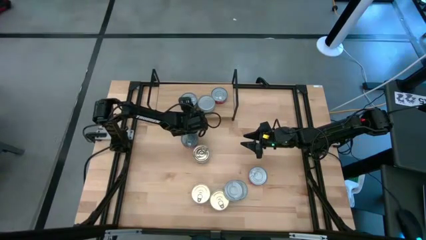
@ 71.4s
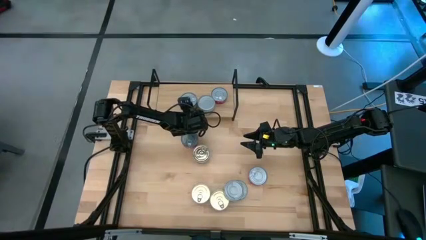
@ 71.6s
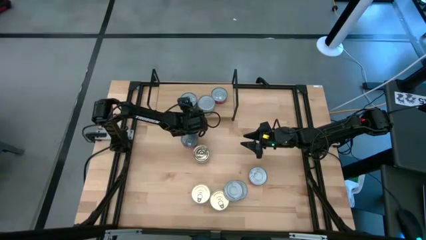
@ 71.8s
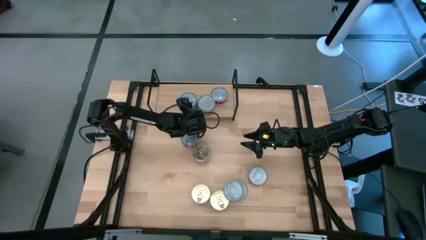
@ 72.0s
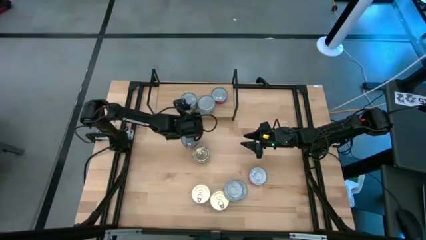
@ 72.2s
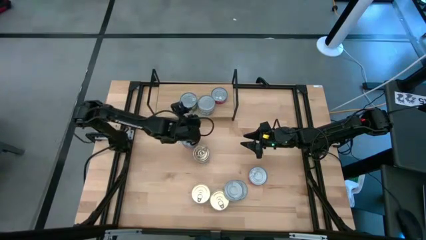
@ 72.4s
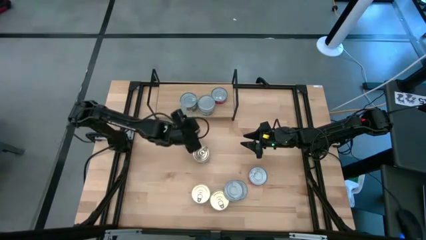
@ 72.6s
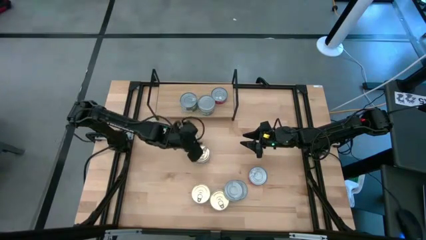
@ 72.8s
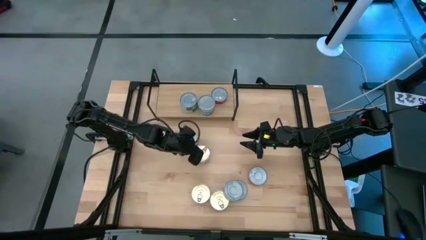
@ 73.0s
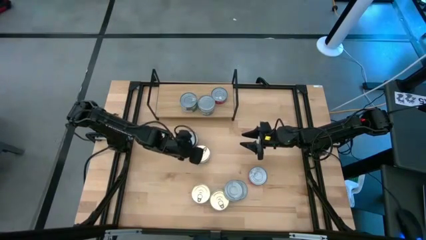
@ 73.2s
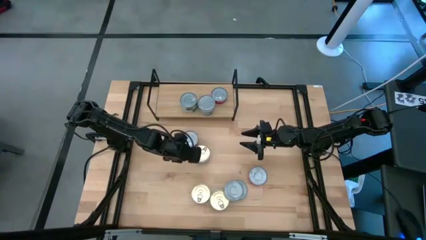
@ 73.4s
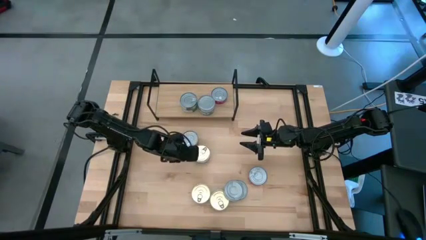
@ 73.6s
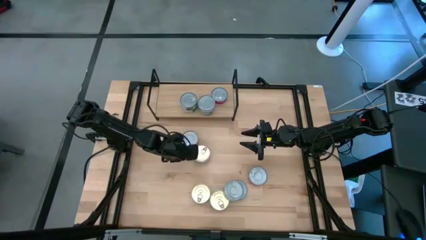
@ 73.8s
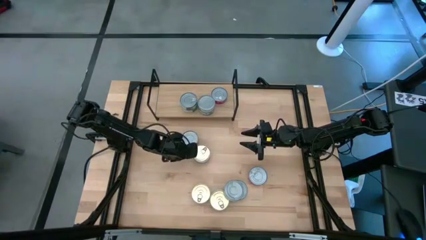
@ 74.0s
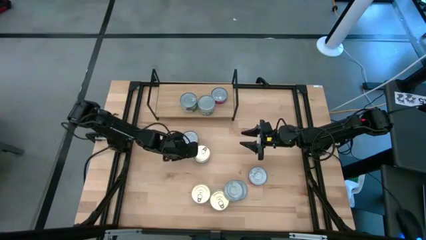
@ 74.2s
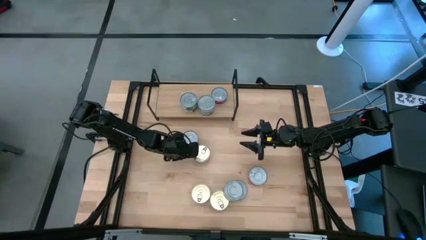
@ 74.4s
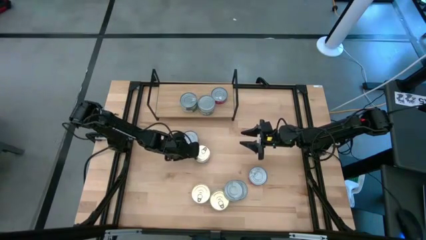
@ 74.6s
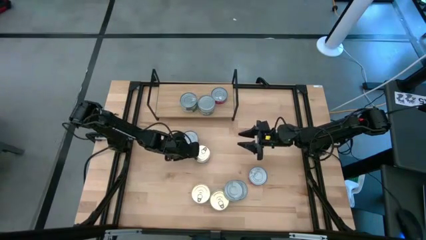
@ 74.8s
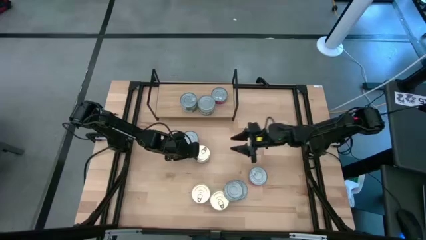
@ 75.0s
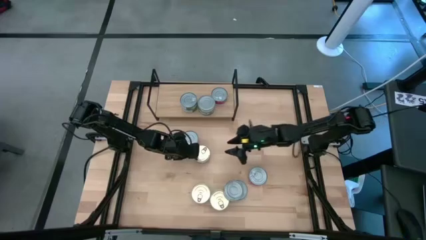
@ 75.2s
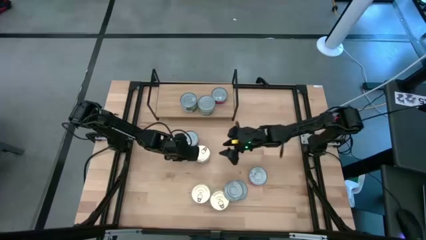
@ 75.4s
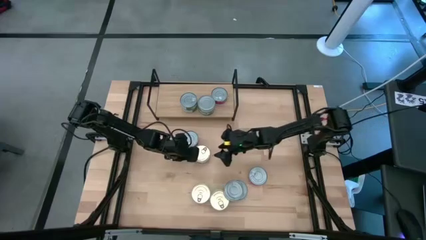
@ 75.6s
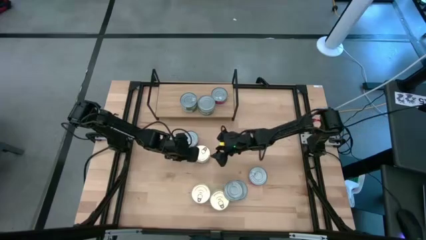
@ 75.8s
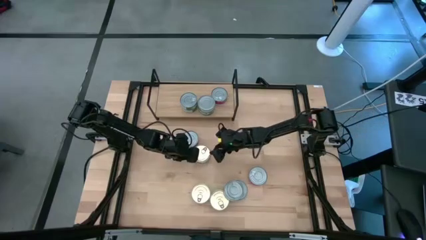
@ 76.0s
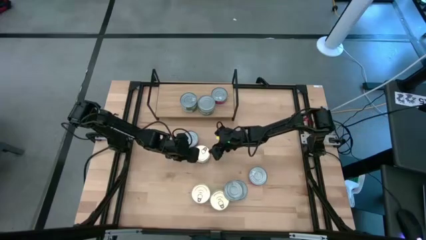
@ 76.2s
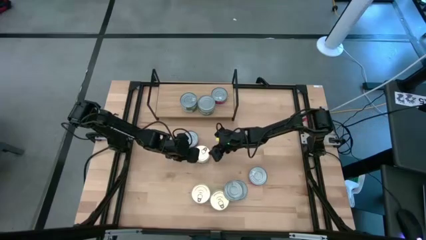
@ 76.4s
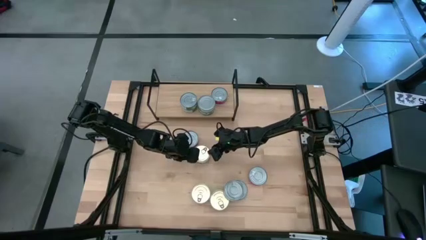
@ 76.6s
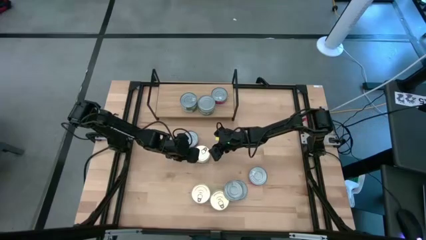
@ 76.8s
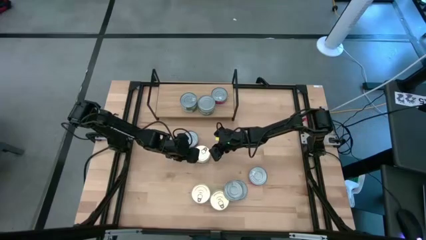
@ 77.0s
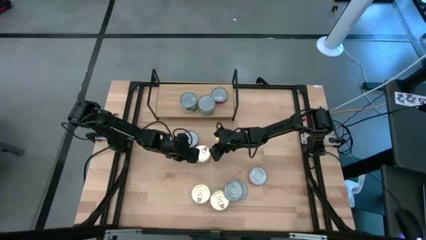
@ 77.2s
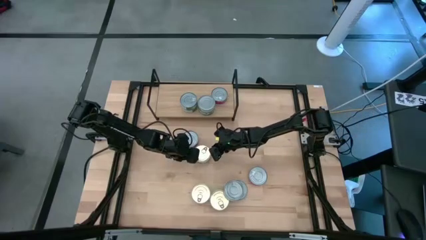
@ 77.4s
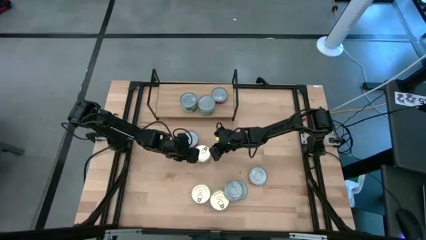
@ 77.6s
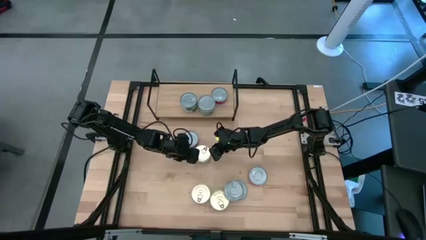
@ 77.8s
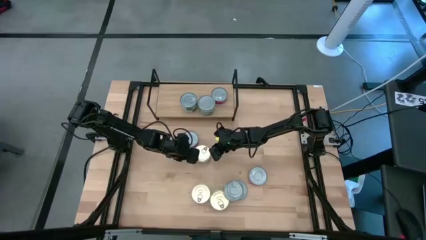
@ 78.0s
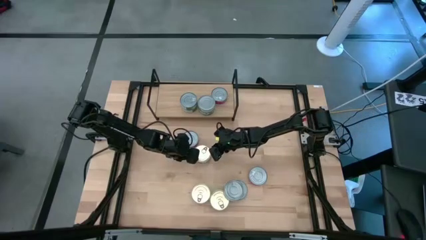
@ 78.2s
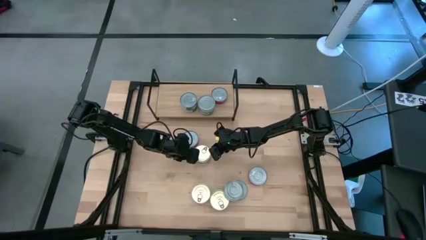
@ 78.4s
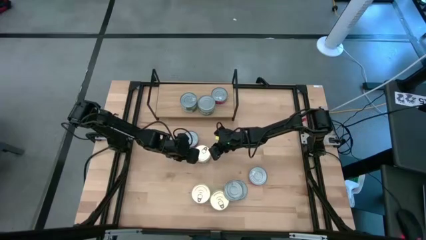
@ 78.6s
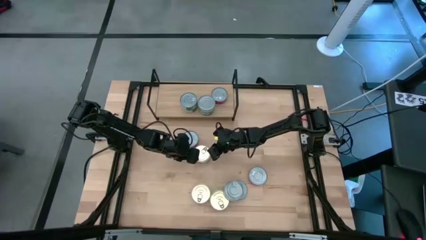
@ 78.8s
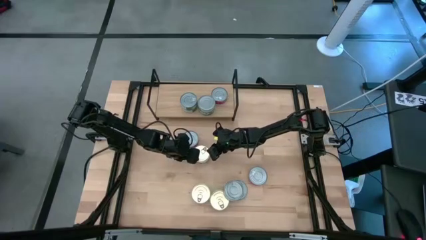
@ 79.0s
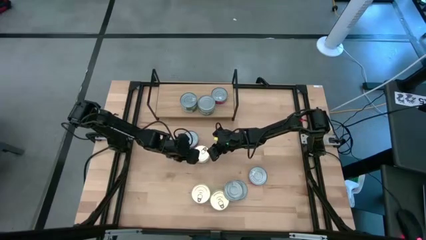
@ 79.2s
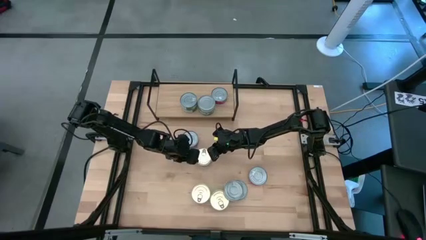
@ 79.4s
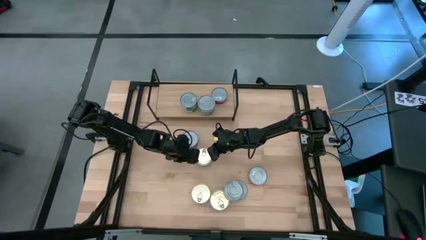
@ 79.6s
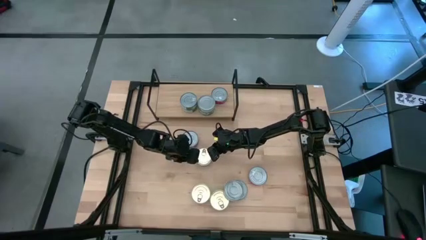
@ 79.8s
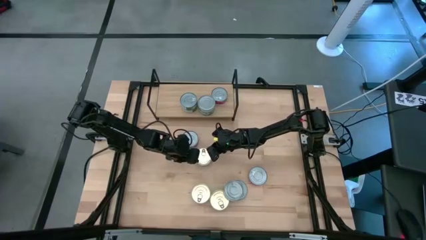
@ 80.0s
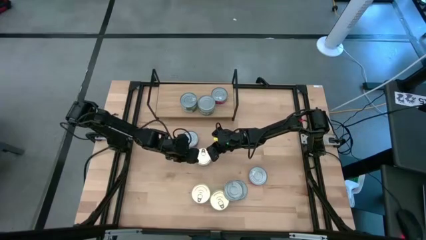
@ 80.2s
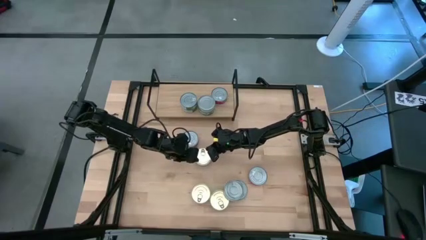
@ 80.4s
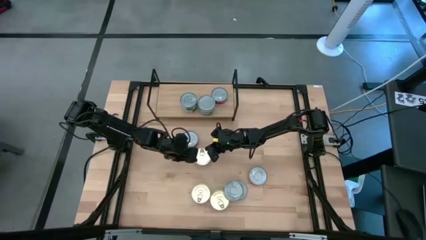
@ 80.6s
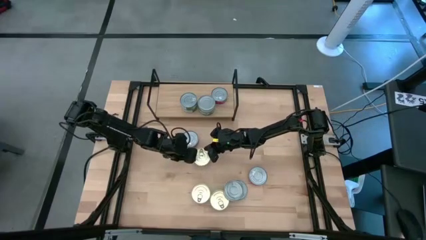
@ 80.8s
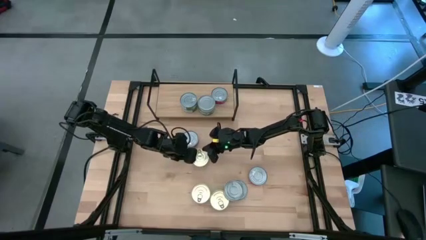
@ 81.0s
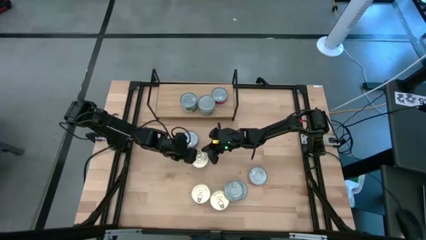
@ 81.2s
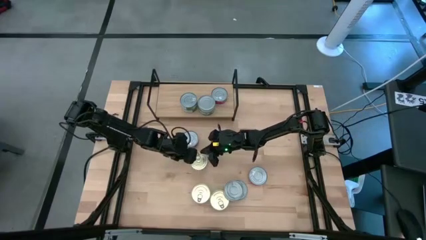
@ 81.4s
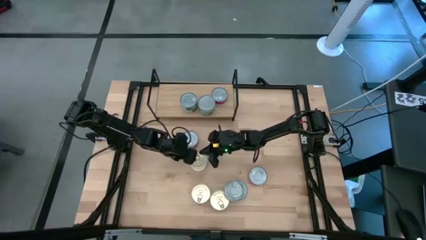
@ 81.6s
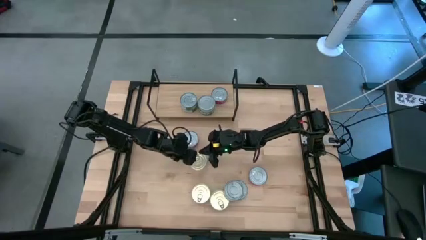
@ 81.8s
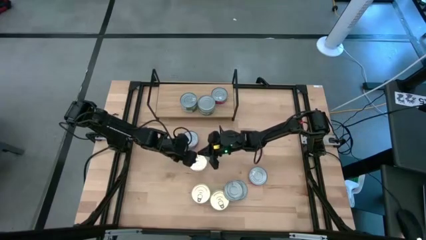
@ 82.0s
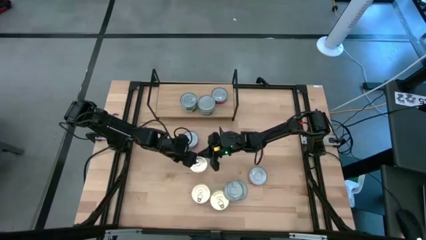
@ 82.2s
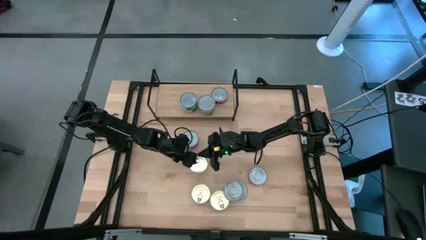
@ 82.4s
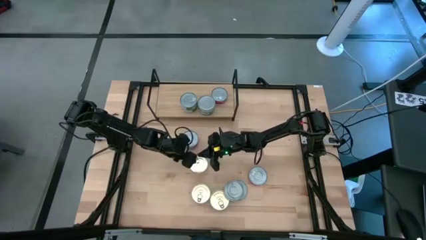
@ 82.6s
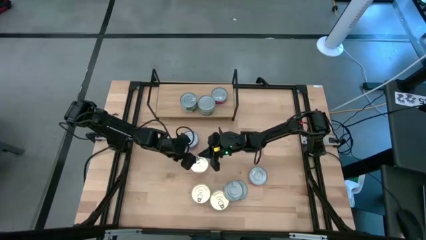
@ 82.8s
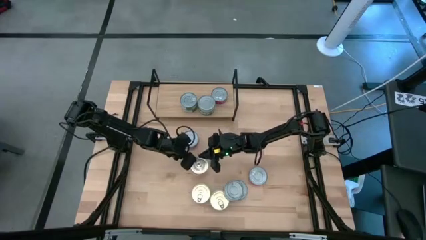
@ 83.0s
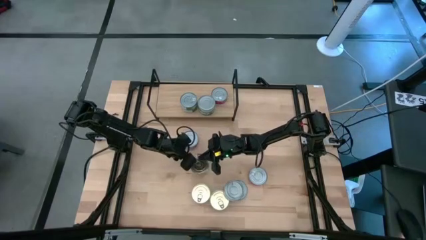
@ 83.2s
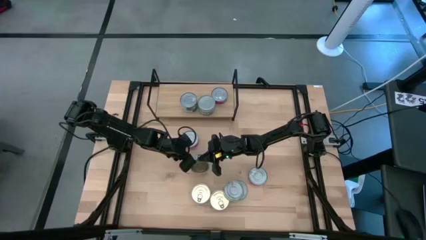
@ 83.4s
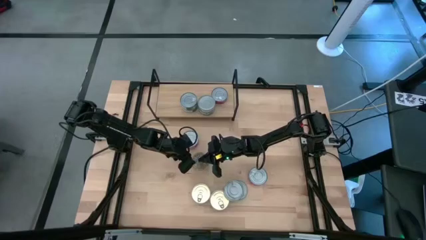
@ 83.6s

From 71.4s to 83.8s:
Task: Stack canned seafood by type on shelf
Put the blue tuna can on the shelf
